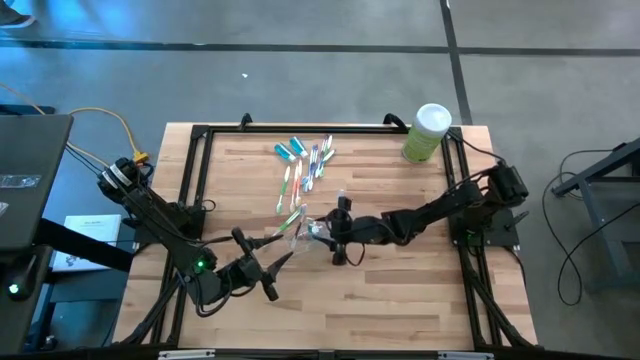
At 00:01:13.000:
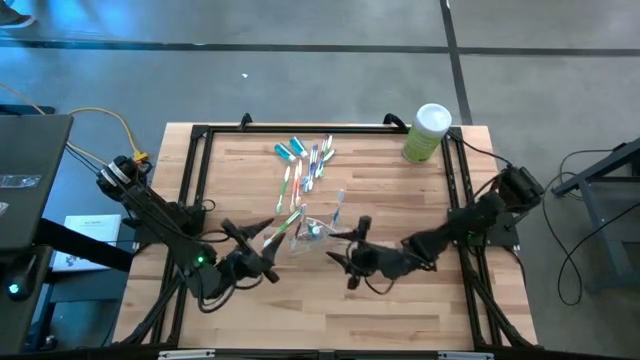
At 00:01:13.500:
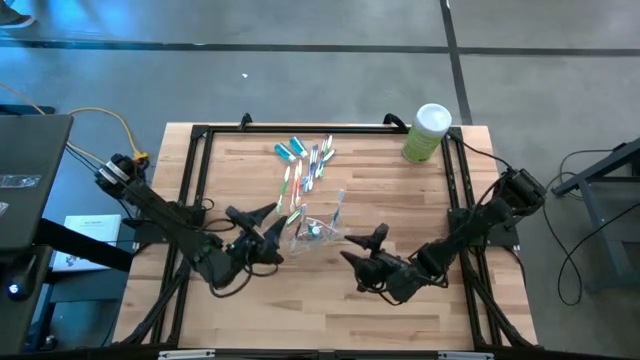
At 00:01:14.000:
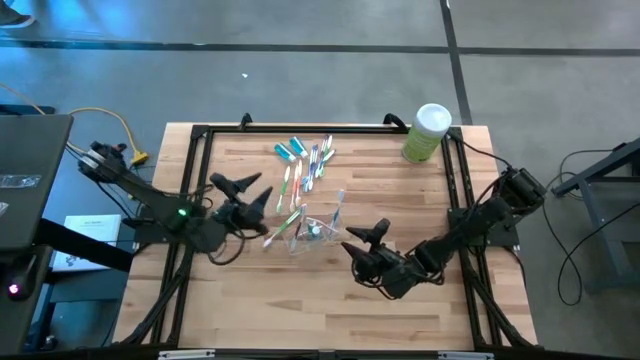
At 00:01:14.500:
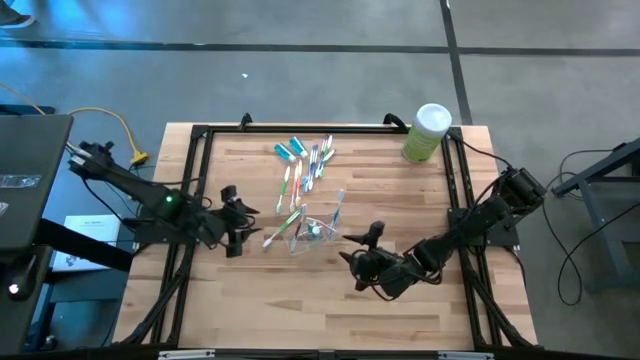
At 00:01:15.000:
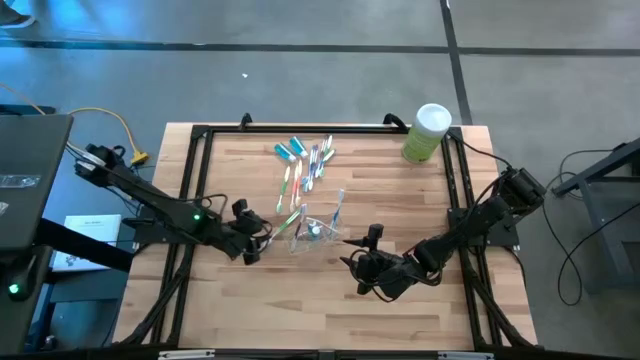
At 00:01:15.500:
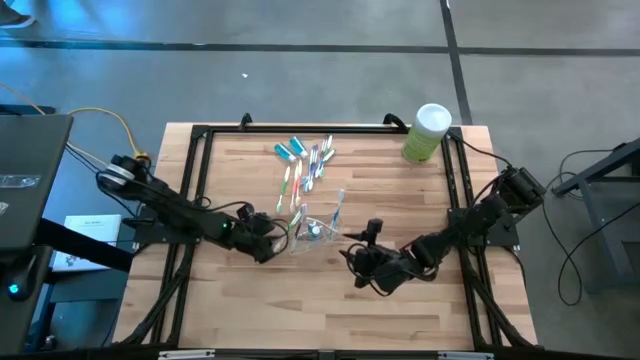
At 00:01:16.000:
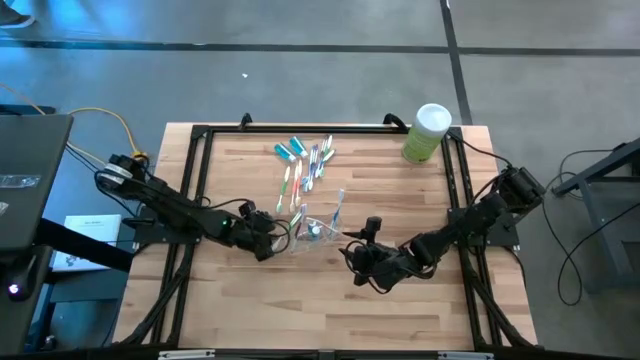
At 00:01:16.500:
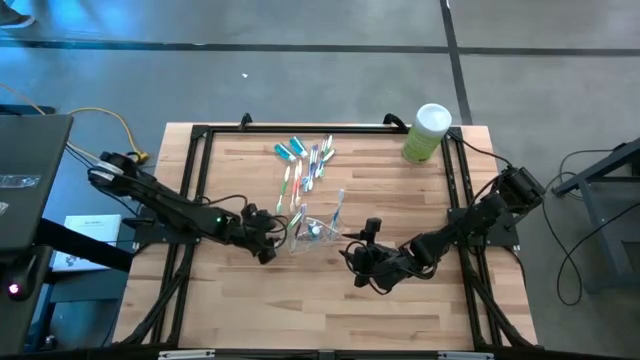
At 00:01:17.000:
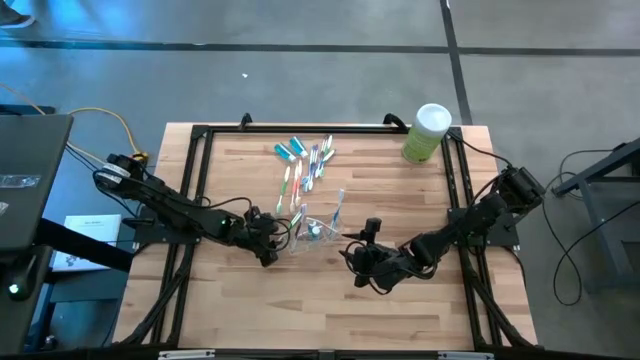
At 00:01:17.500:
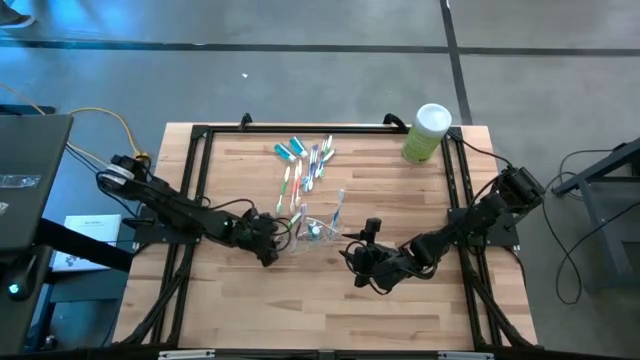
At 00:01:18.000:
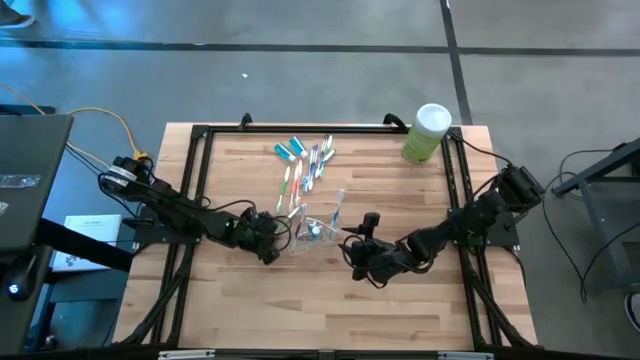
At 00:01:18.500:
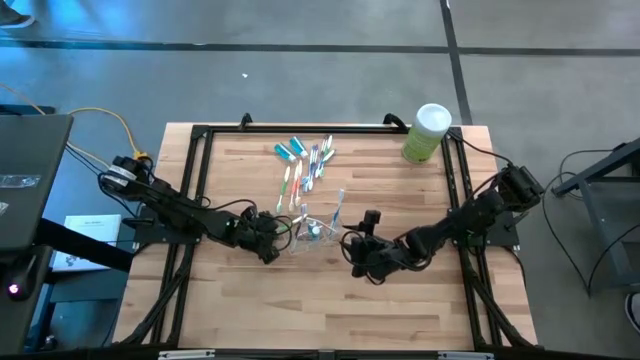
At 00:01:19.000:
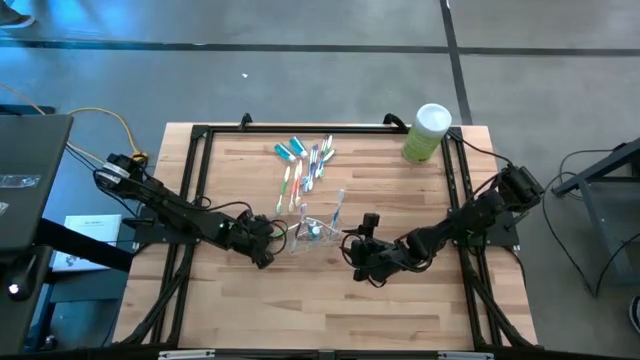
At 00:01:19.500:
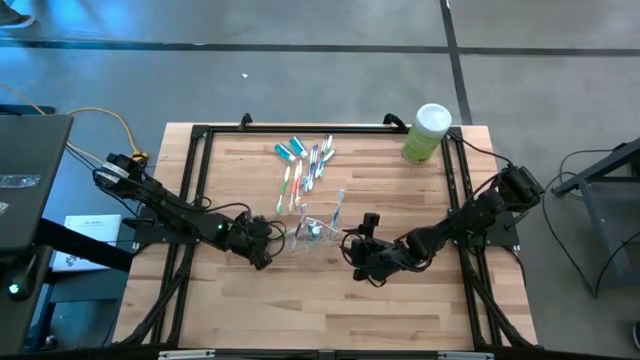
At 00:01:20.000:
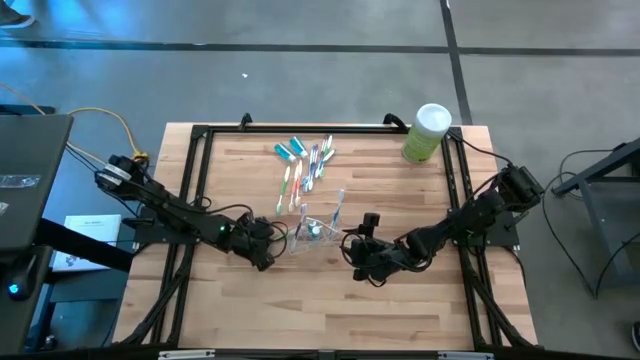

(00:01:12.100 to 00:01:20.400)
Task: Pick & Place toothbrushing station
Put the green toothbrush into the transparent organizer

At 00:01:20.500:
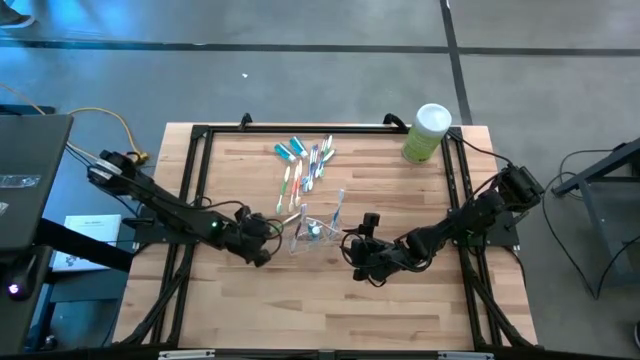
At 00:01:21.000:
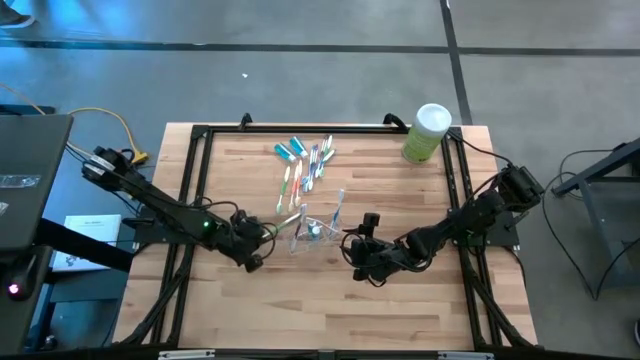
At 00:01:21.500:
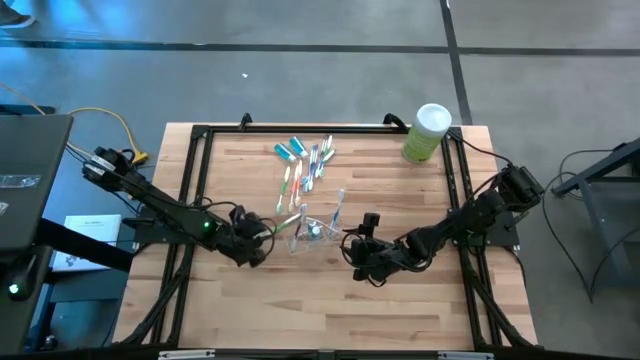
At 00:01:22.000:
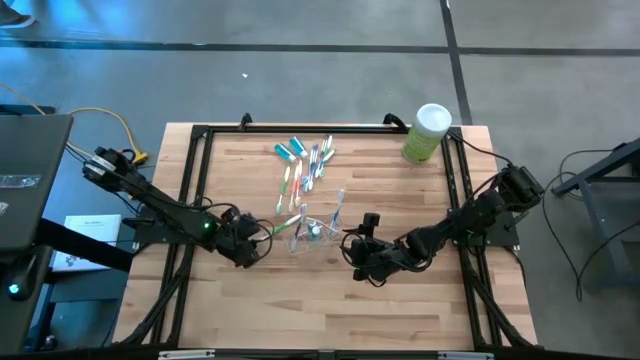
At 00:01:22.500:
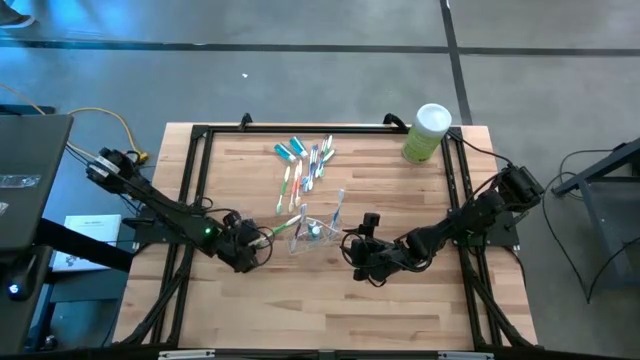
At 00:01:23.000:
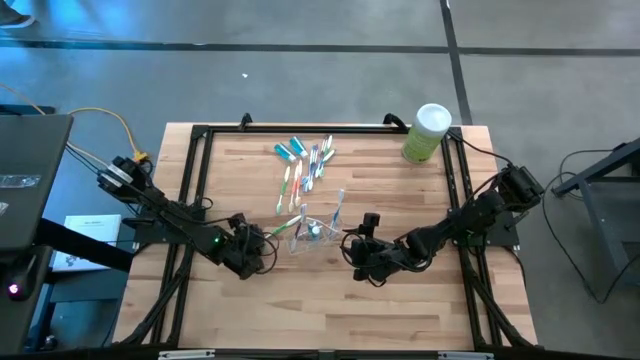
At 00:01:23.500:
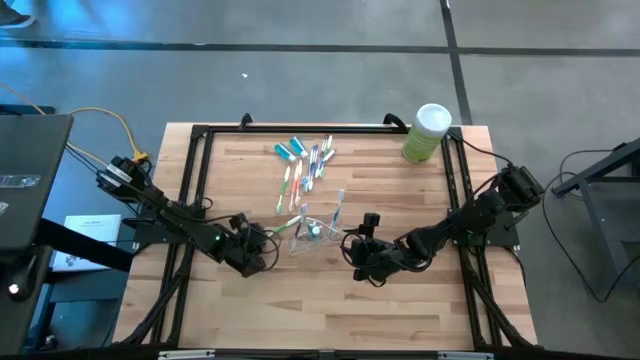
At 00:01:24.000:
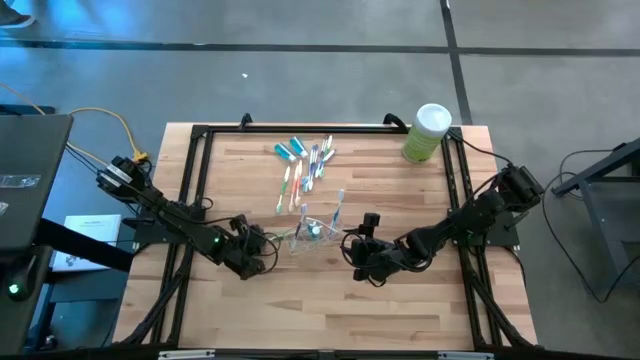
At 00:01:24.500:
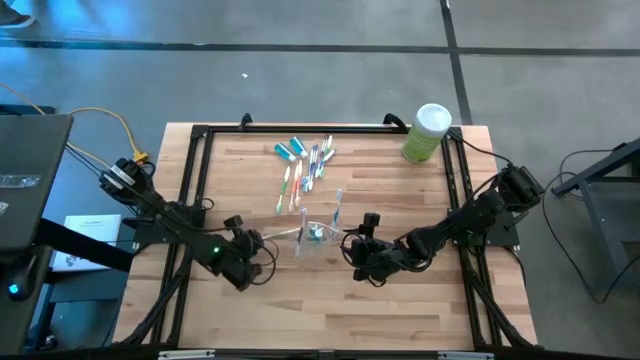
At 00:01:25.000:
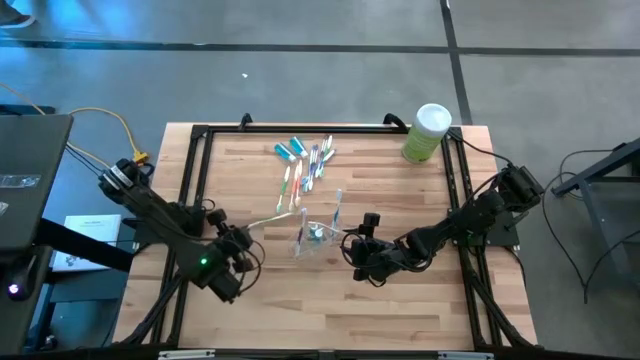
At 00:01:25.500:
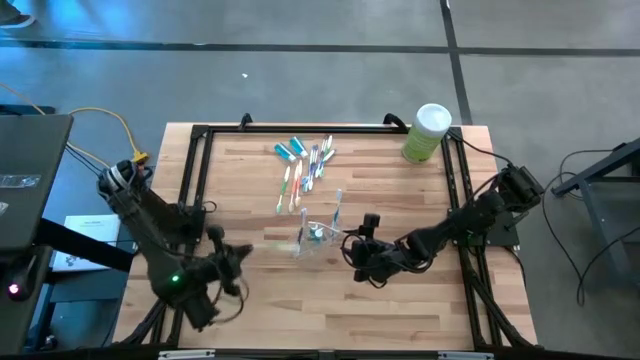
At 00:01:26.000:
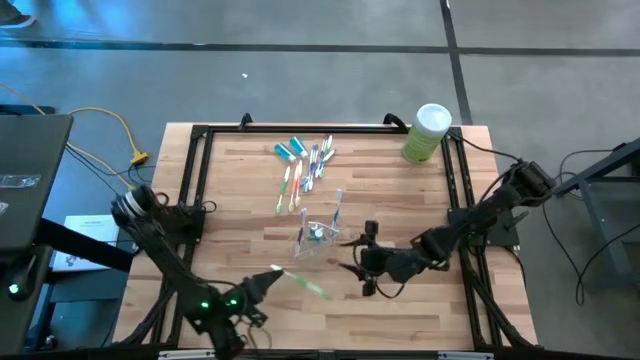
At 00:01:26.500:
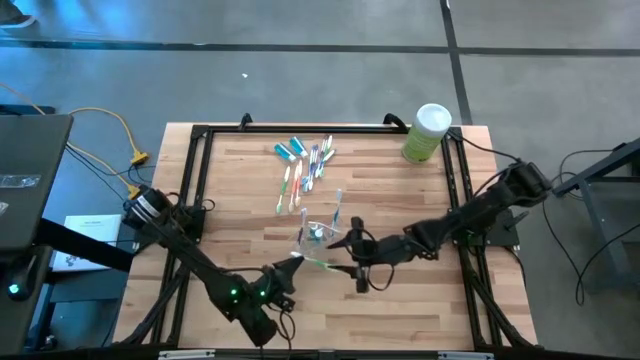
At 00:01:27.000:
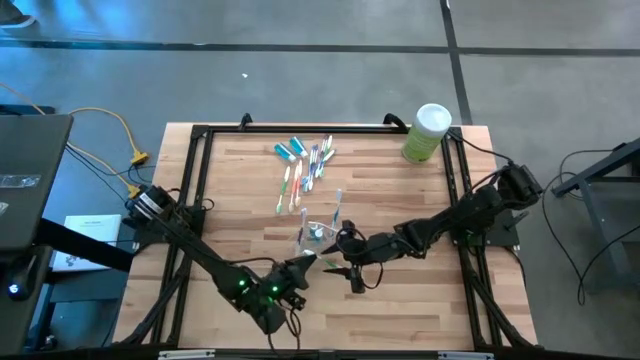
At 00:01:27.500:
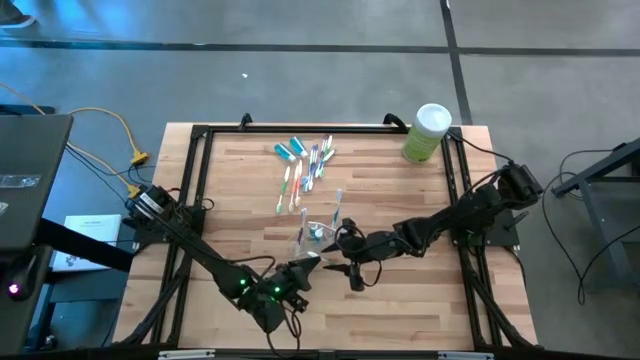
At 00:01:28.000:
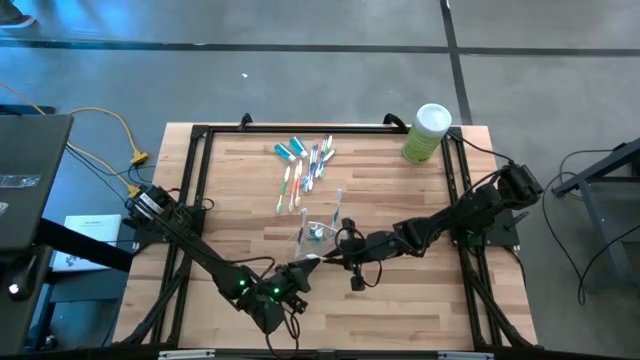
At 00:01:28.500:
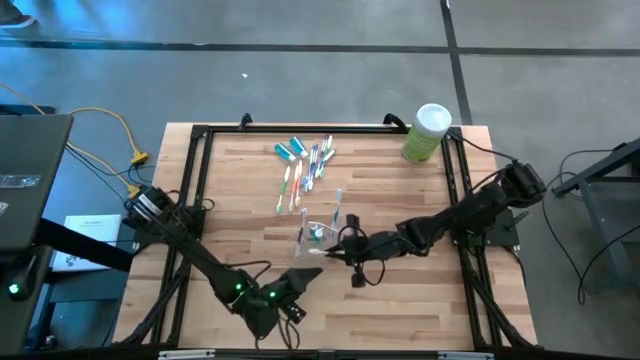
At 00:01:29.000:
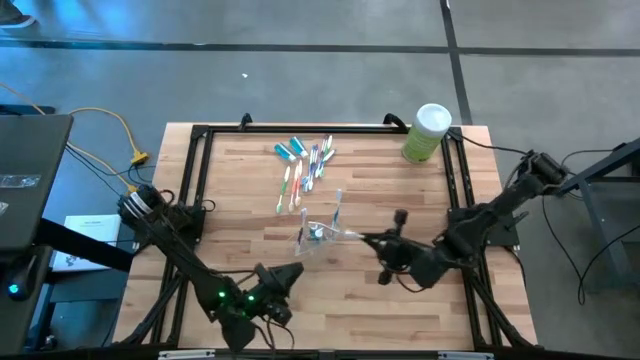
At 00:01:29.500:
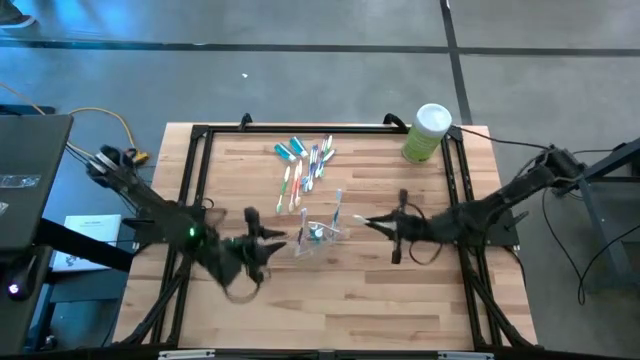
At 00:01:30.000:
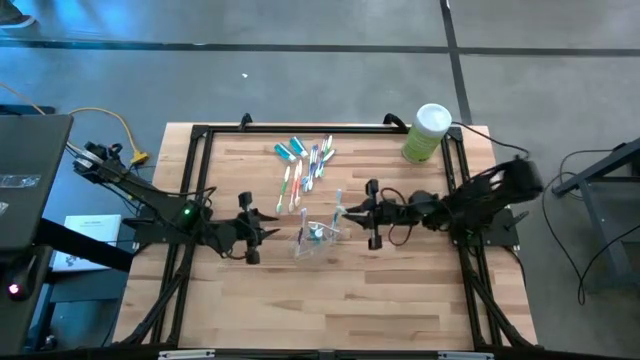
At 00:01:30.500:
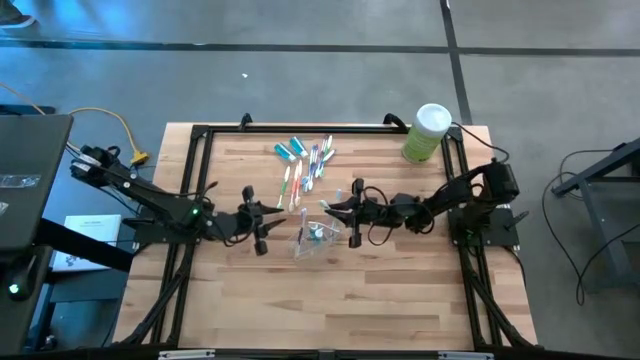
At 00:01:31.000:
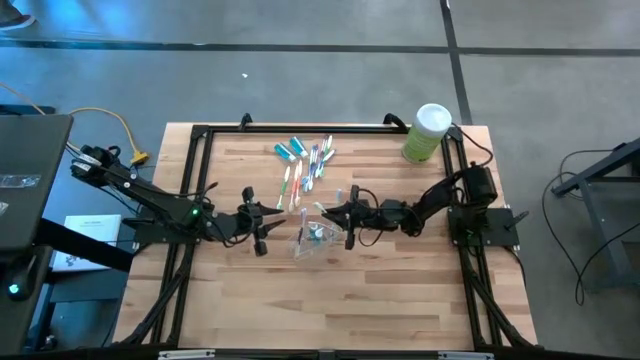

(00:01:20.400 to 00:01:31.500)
Put the green toothbrush into the transparent organizer

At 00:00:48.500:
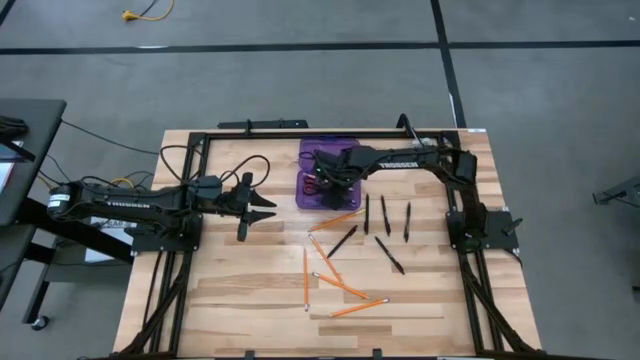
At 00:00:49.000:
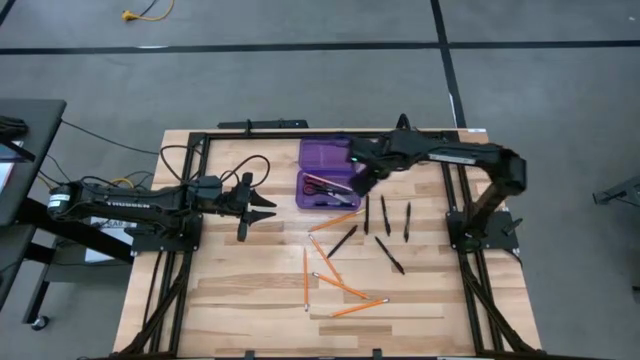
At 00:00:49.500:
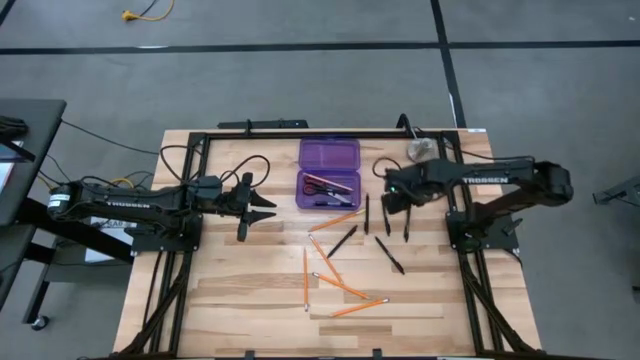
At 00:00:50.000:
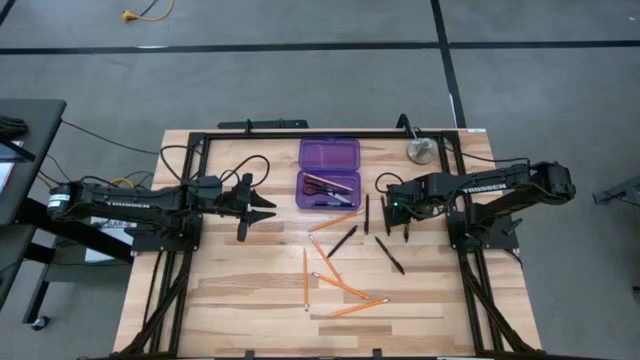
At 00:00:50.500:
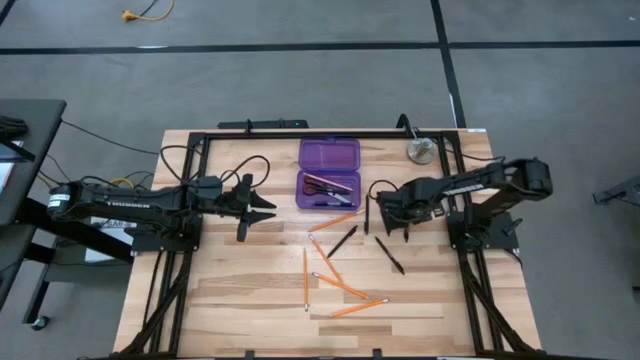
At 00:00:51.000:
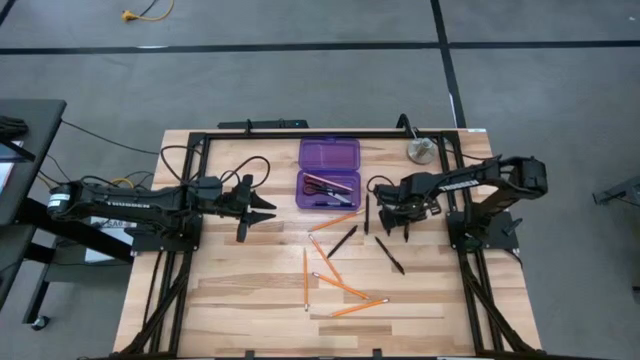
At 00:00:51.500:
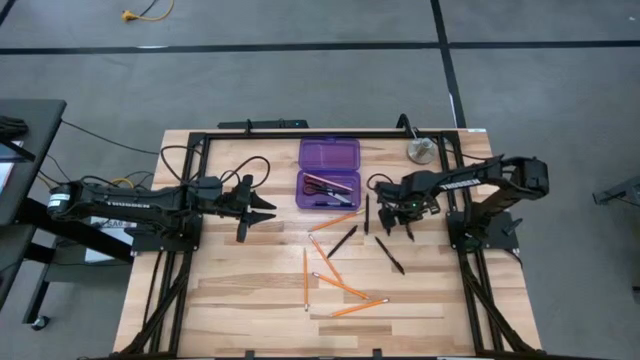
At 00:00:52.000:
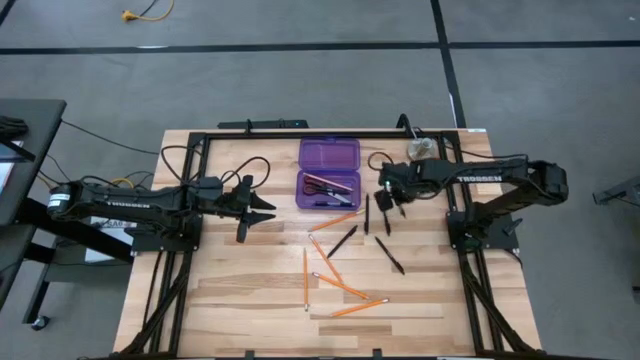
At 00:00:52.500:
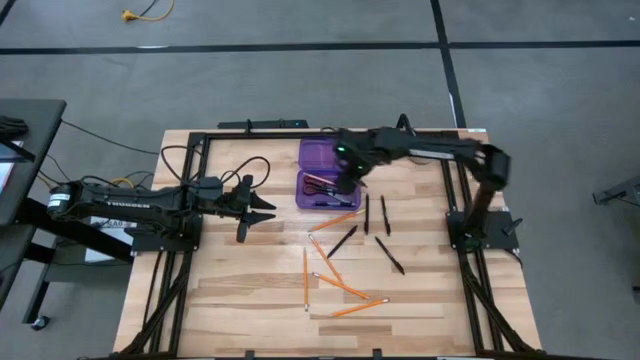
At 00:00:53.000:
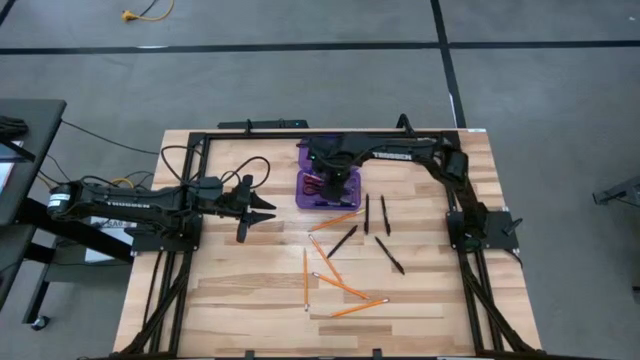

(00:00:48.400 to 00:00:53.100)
Task: Pick & place school supplies into a supply box
Put the transparent pen into the violet supply box
